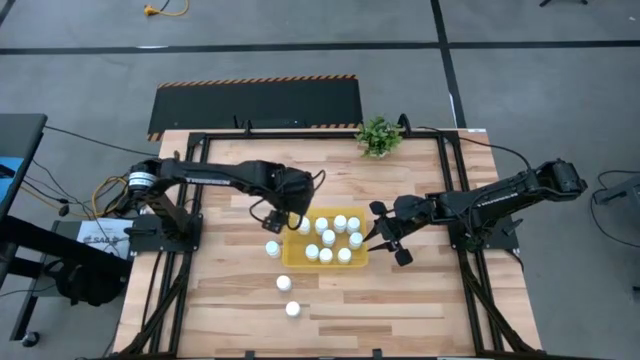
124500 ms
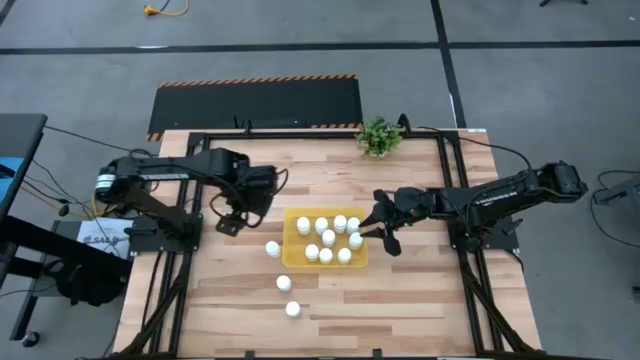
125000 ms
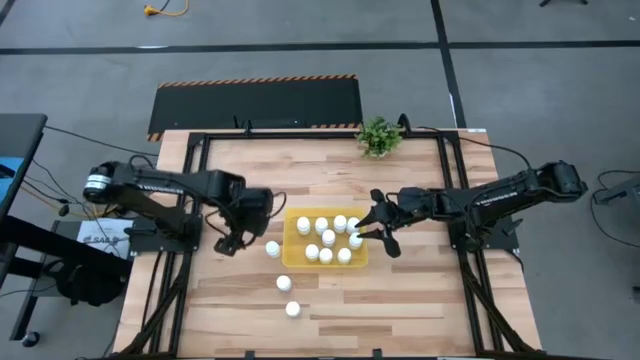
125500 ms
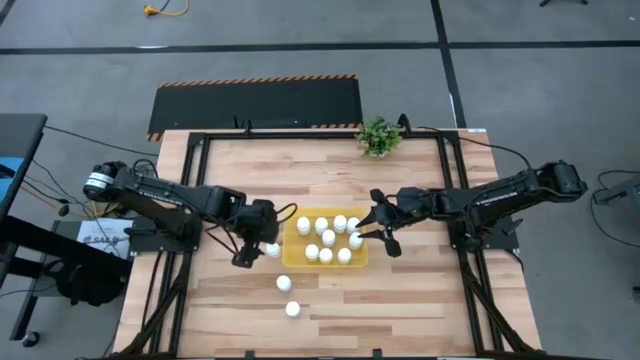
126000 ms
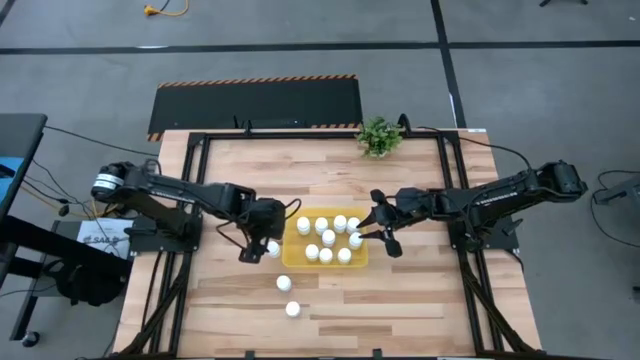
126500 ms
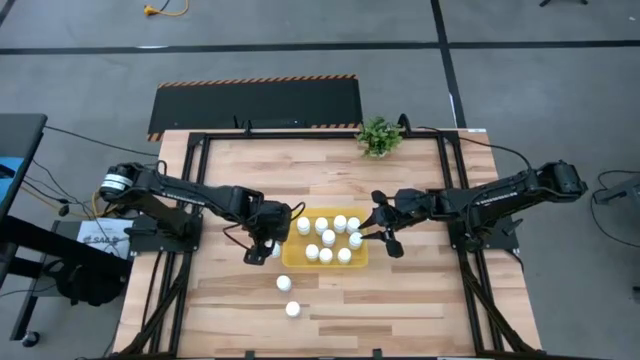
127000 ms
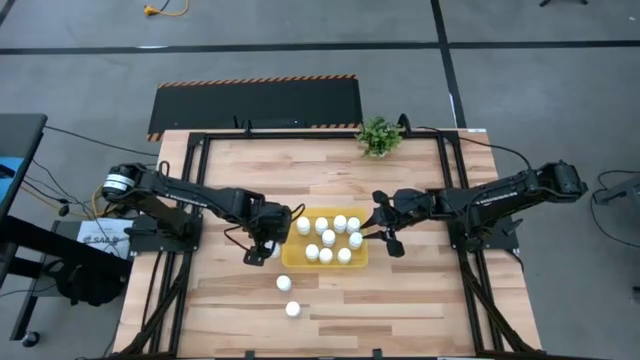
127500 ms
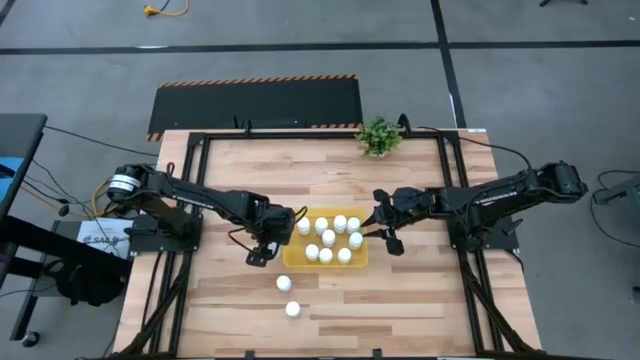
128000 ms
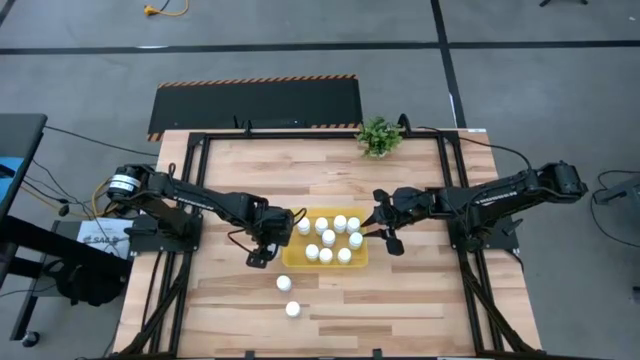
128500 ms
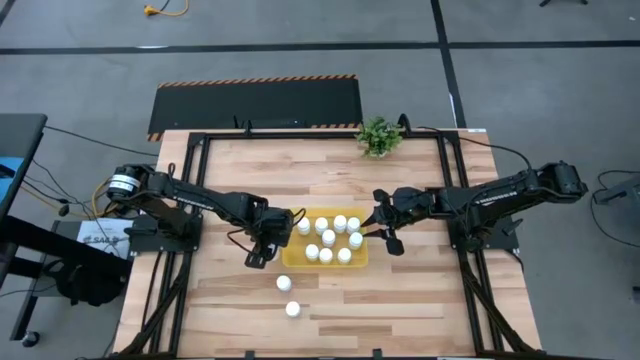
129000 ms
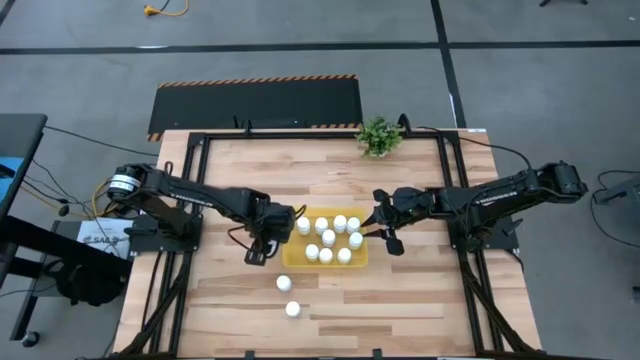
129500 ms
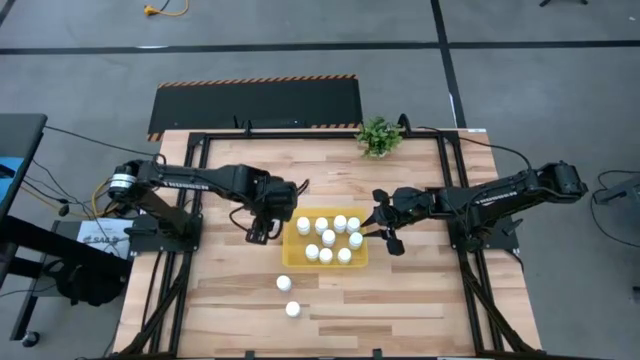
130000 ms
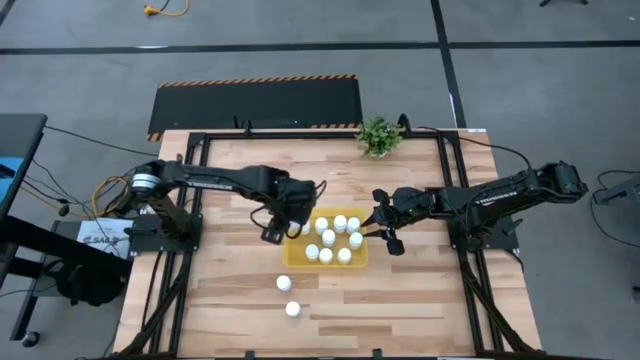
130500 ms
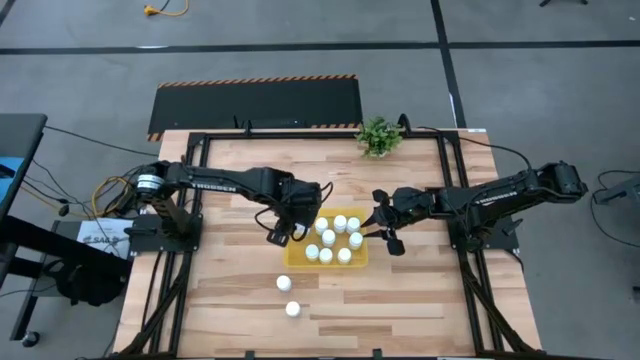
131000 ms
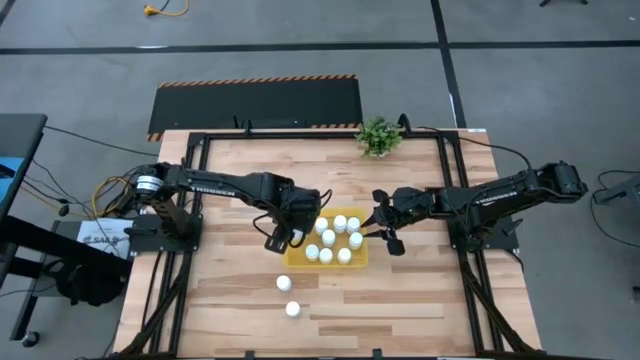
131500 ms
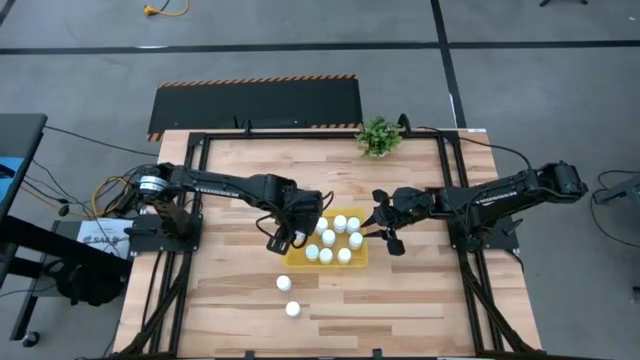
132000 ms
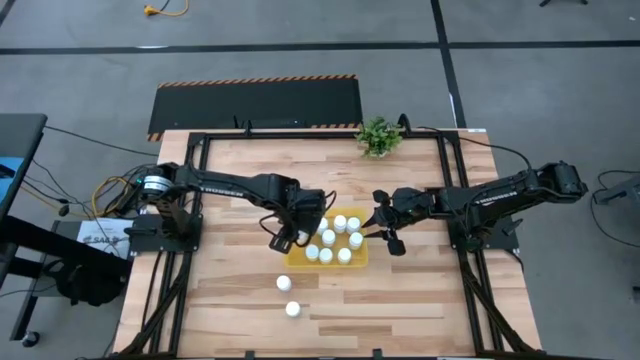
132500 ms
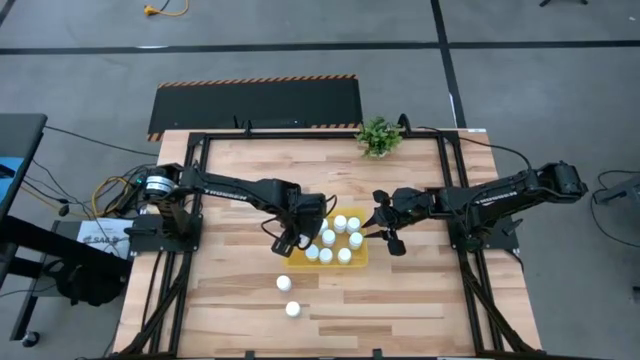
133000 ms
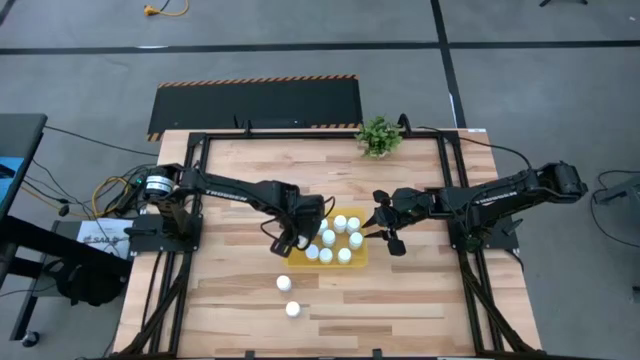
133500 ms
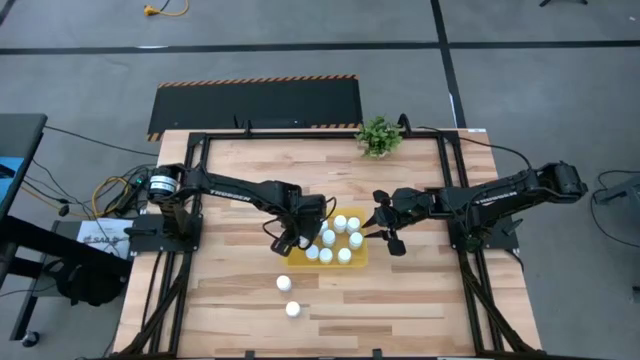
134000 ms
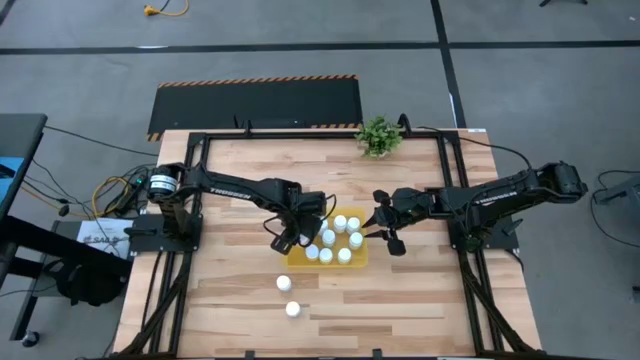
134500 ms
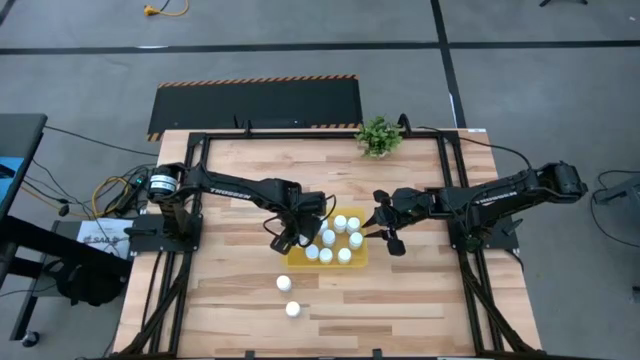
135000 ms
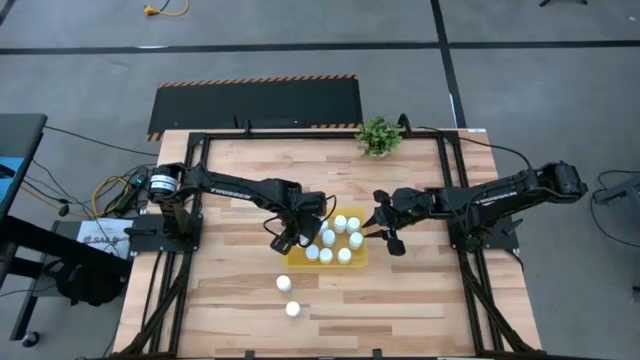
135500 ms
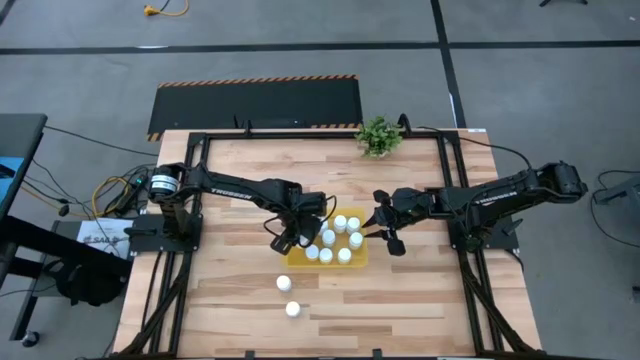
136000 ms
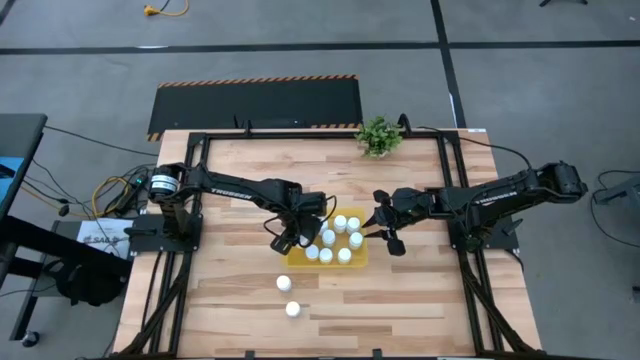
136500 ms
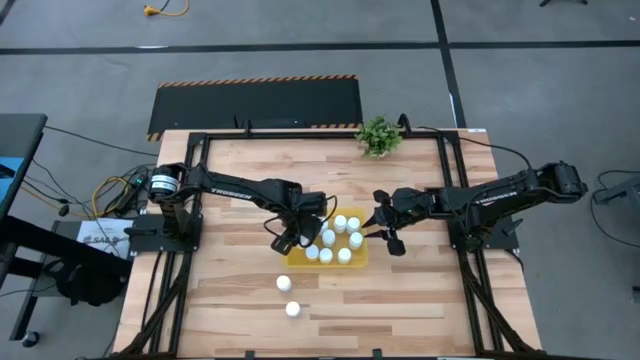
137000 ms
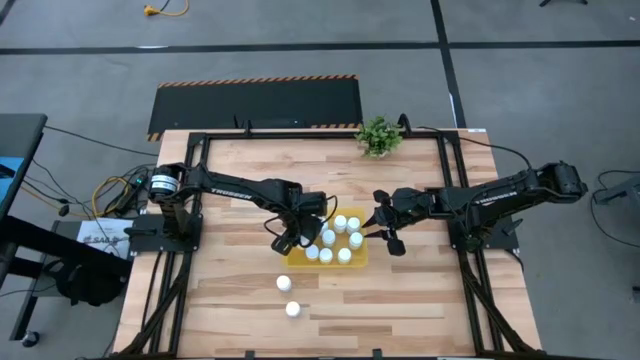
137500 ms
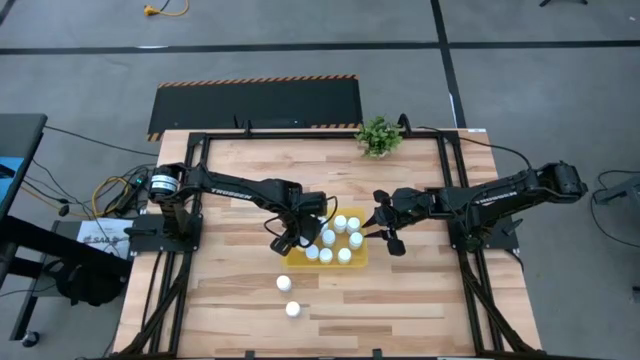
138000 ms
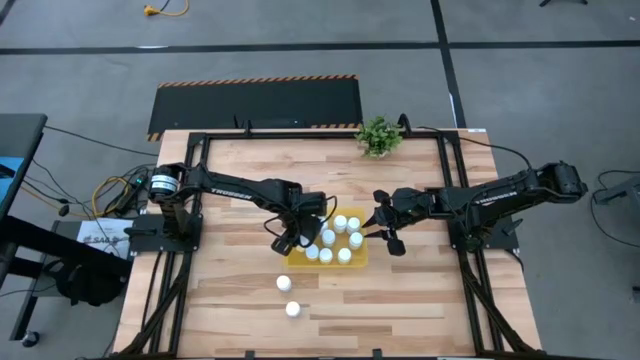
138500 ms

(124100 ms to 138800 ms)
Task: Pick and place pill bottles into a basket
Put the white pill bottle into the yellow bin

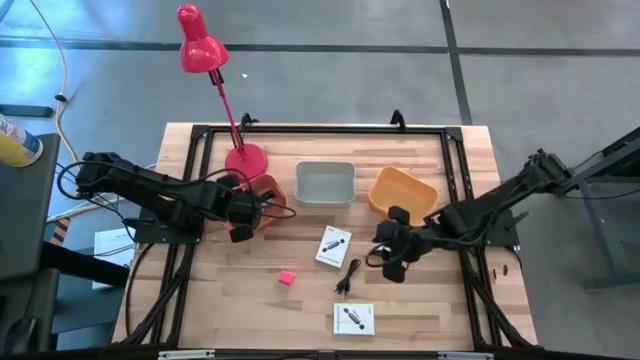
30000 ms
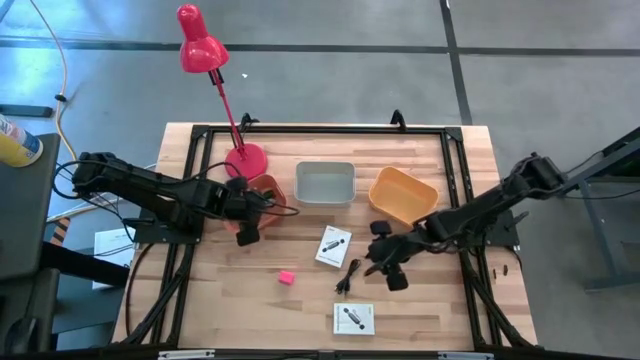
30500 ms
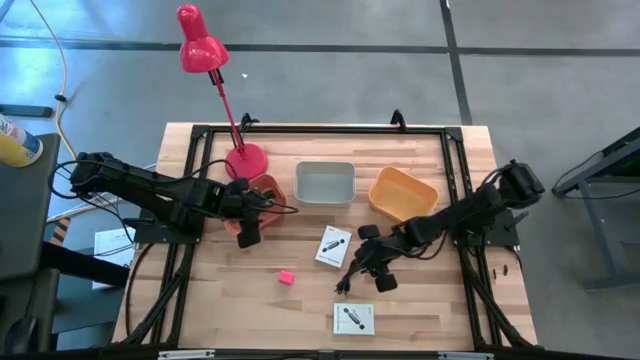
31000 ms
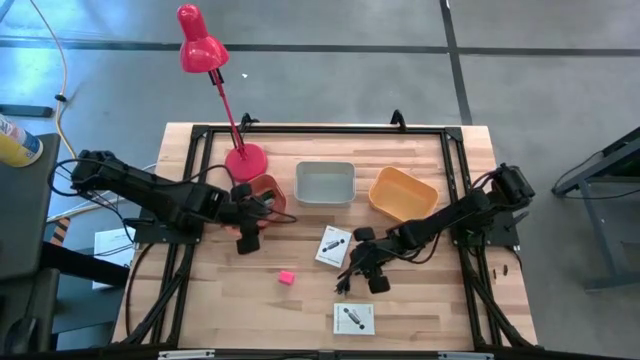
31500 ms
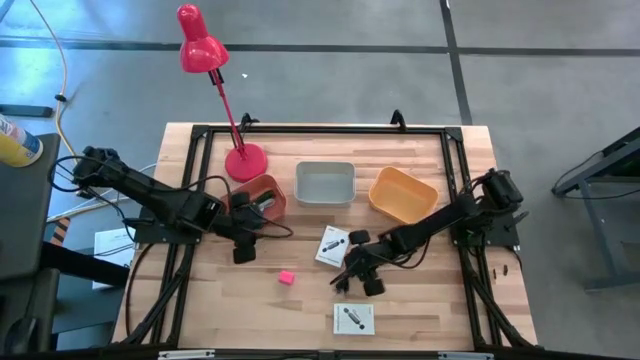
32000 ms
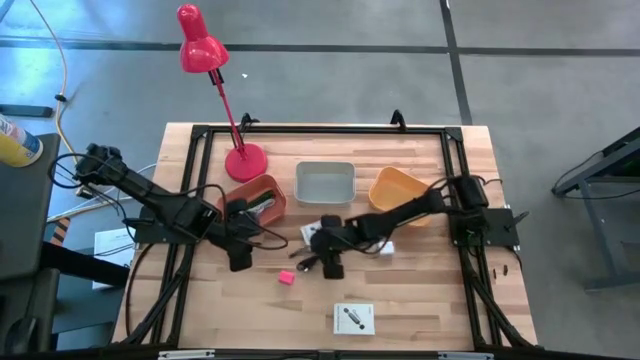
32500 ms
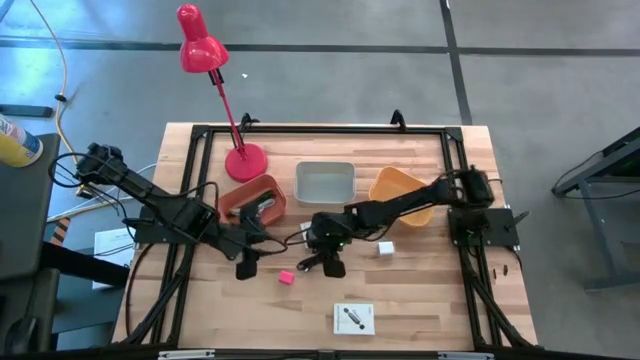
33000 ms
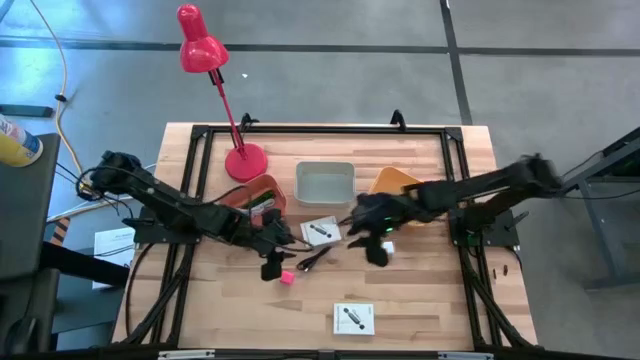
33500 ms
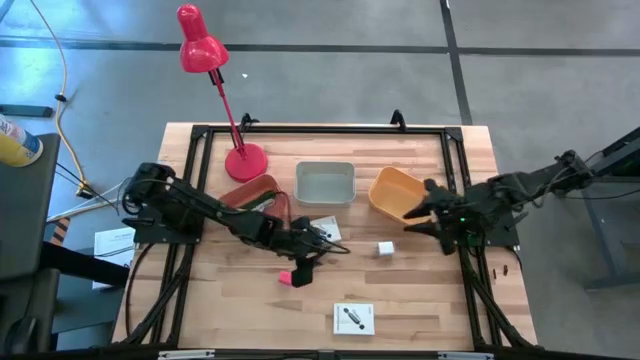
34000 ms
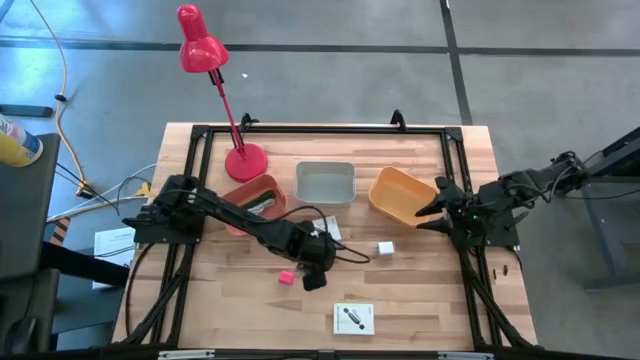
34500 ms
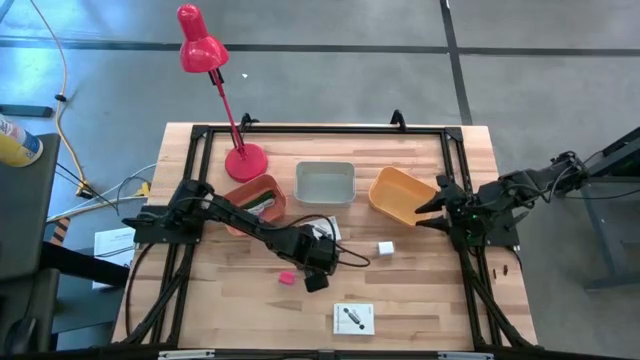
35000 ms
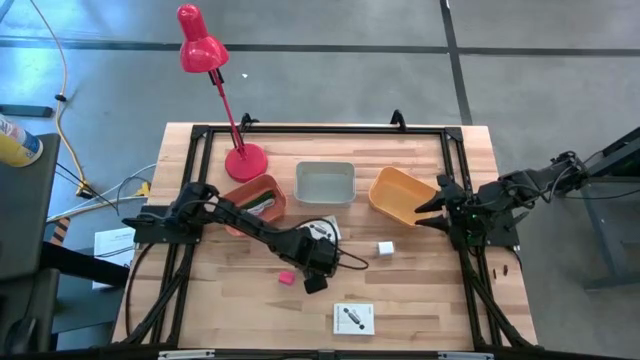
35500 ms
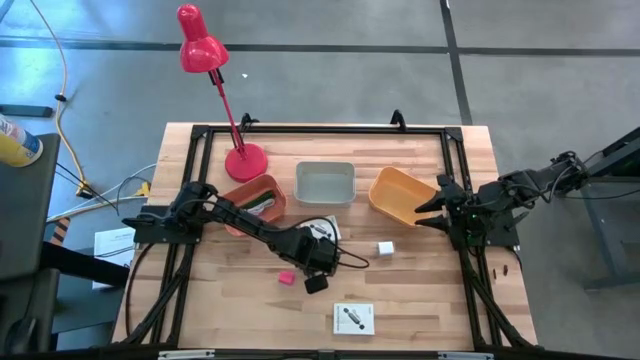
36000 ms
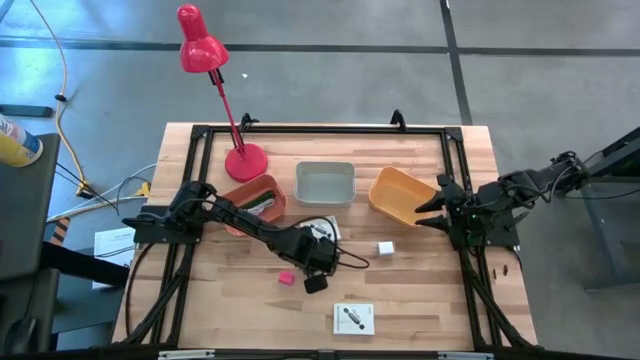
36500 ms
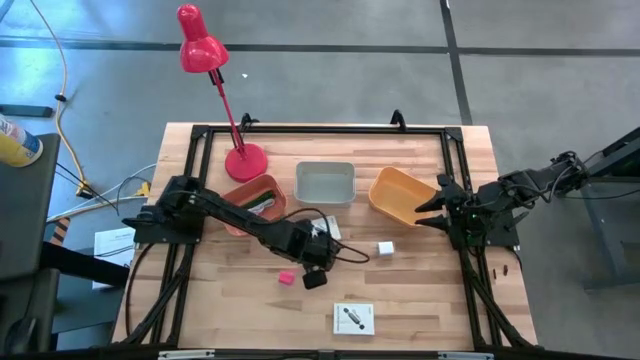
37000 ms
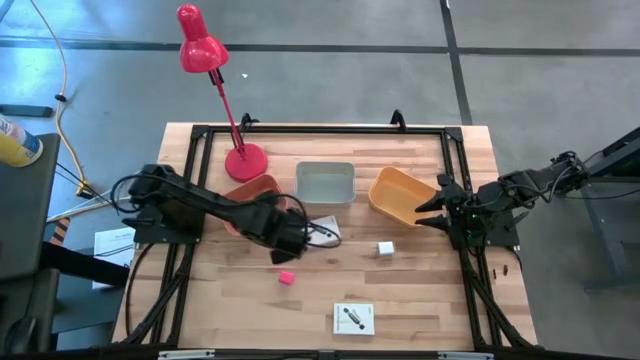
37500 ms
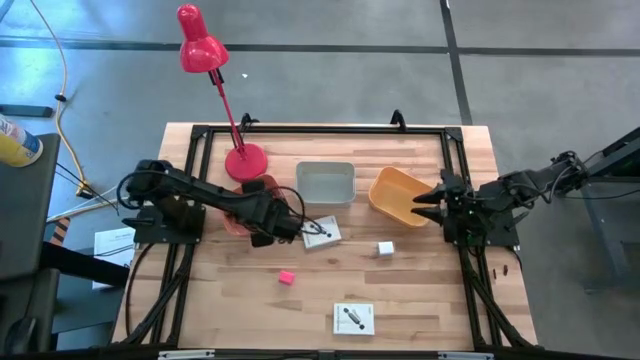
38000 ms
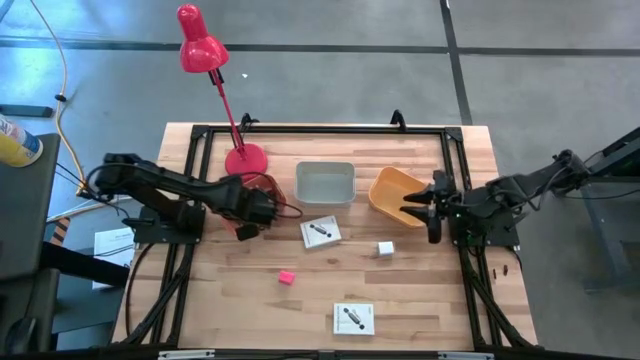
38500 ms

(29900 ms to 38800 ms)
Task: Pick and place items into bin
Put the black charger cable into the dark brown bin
